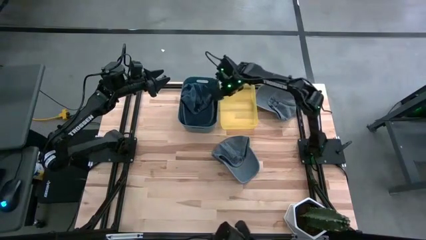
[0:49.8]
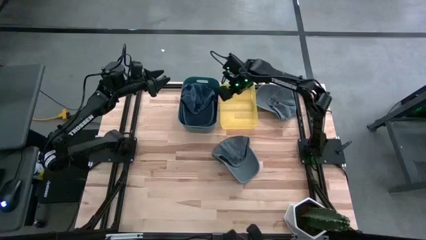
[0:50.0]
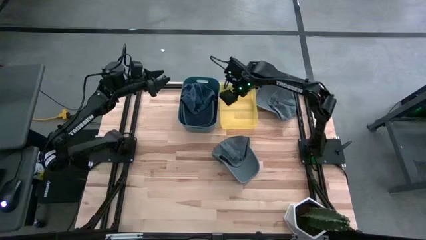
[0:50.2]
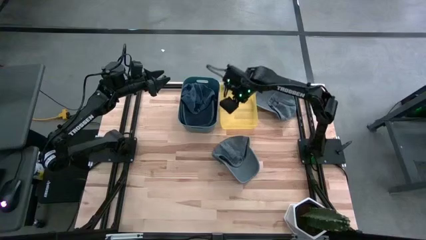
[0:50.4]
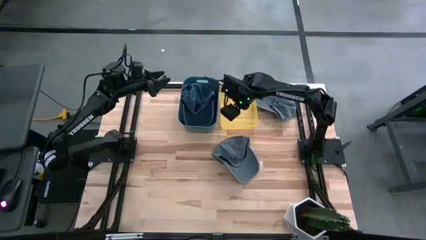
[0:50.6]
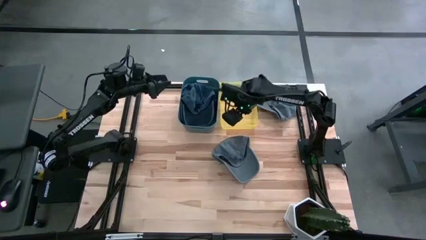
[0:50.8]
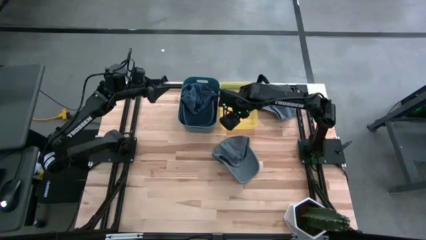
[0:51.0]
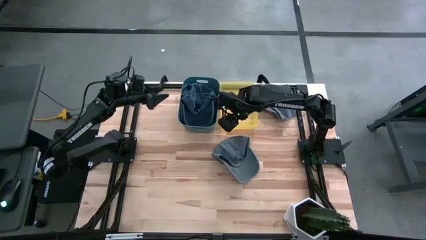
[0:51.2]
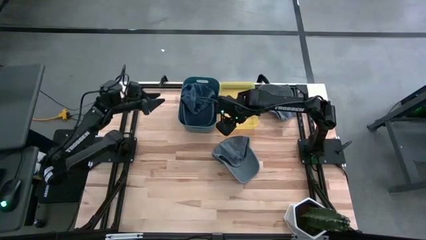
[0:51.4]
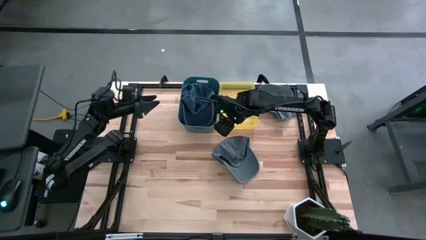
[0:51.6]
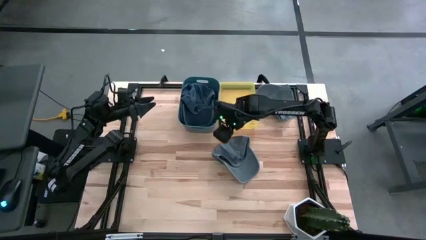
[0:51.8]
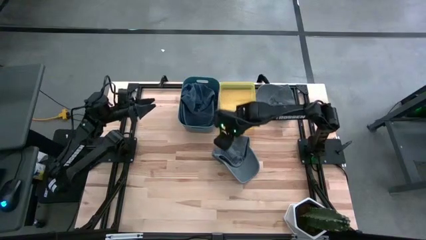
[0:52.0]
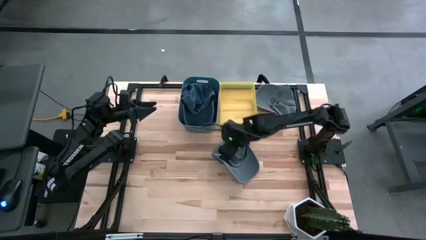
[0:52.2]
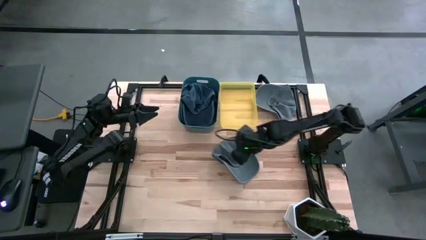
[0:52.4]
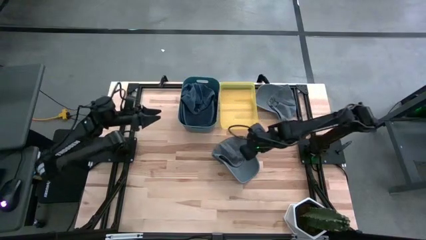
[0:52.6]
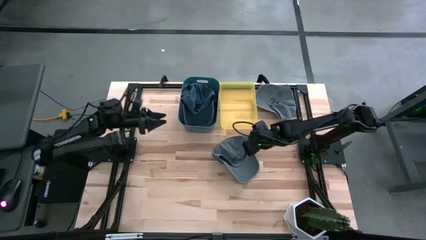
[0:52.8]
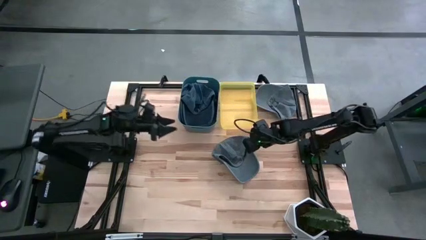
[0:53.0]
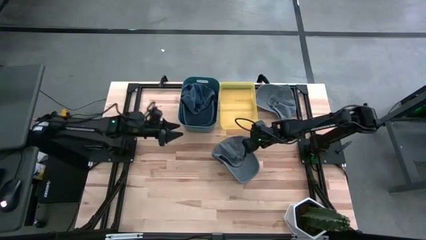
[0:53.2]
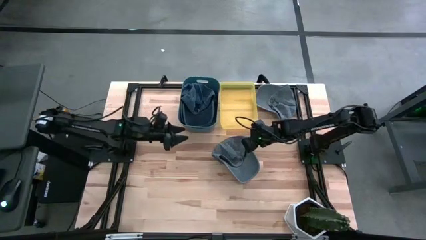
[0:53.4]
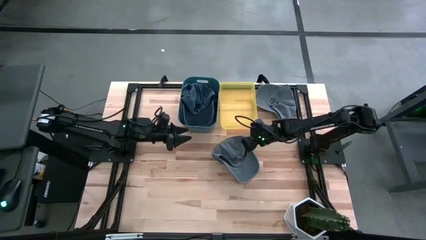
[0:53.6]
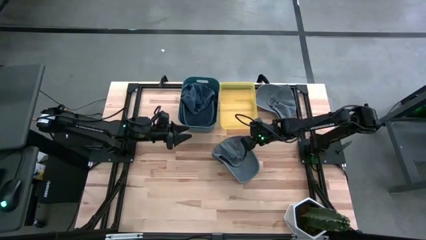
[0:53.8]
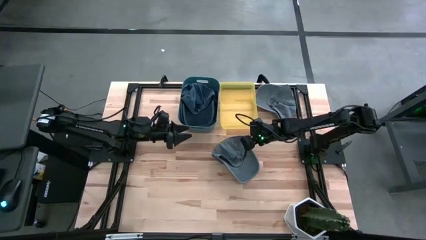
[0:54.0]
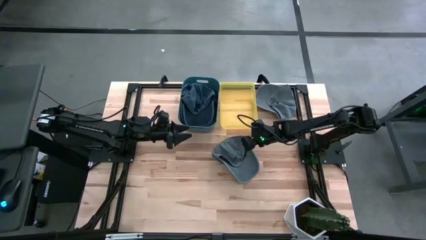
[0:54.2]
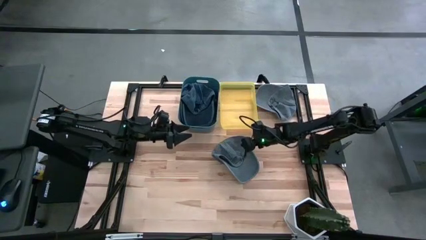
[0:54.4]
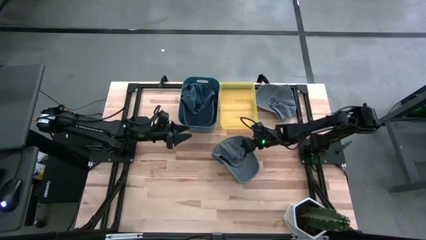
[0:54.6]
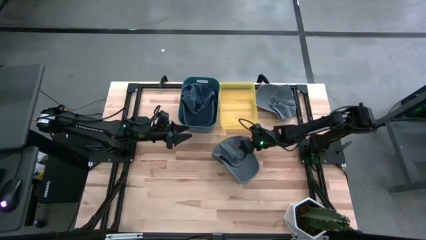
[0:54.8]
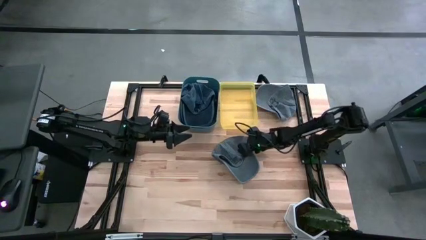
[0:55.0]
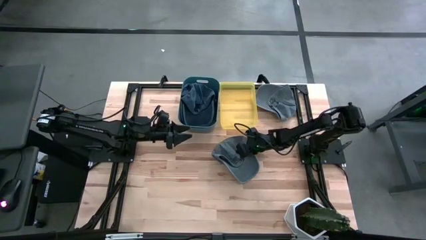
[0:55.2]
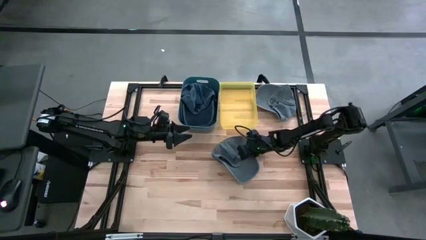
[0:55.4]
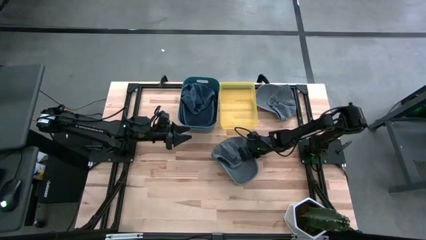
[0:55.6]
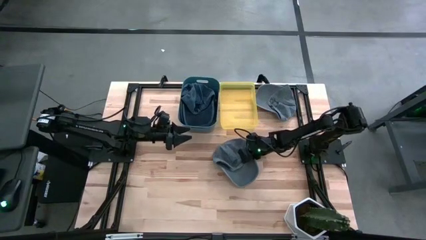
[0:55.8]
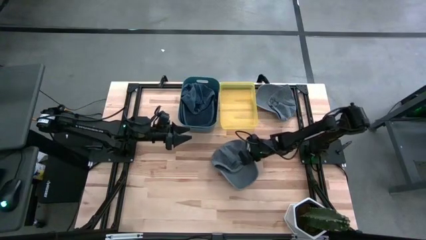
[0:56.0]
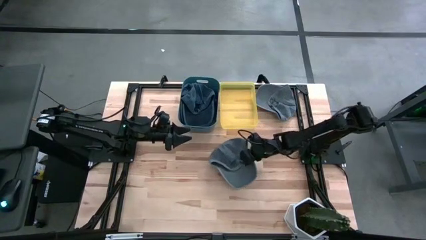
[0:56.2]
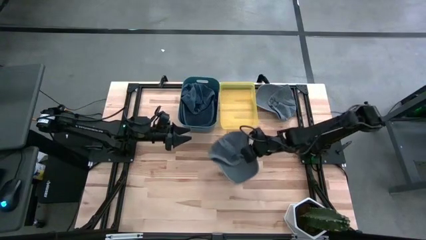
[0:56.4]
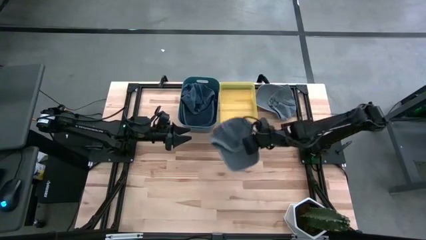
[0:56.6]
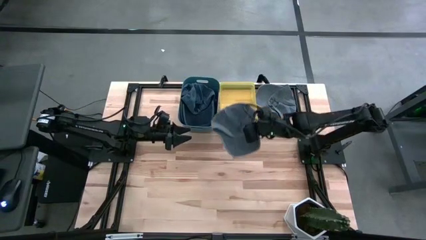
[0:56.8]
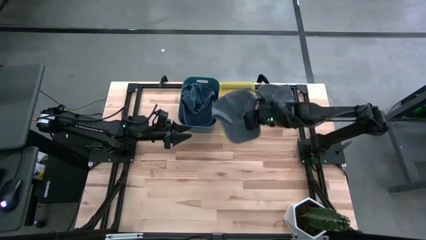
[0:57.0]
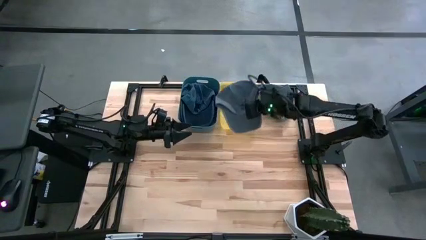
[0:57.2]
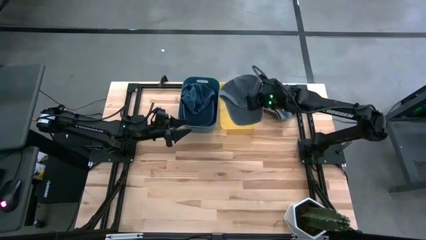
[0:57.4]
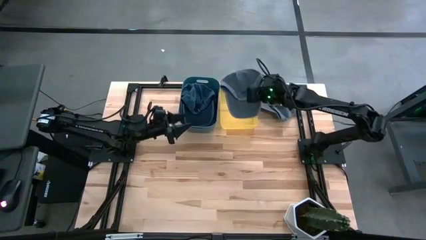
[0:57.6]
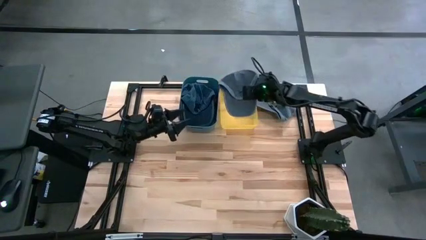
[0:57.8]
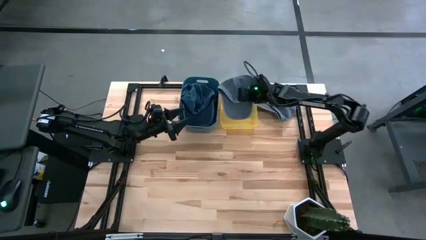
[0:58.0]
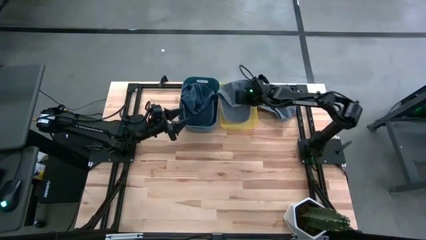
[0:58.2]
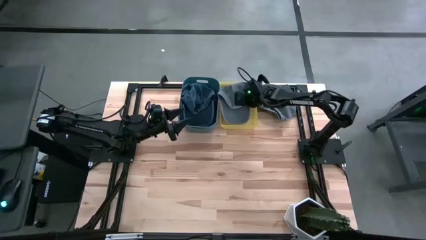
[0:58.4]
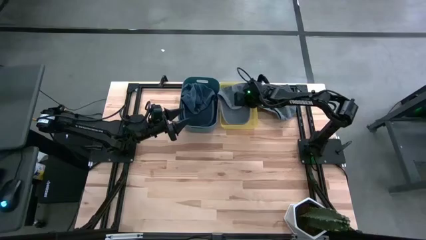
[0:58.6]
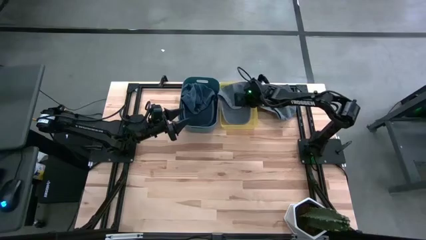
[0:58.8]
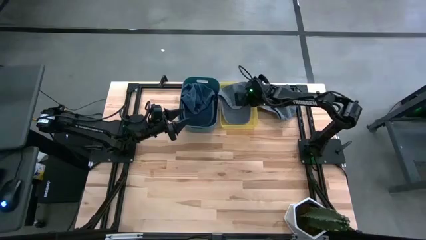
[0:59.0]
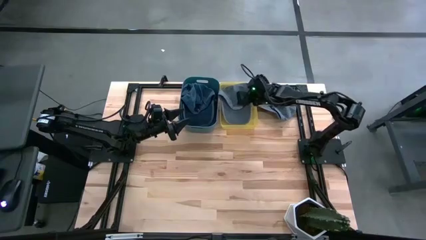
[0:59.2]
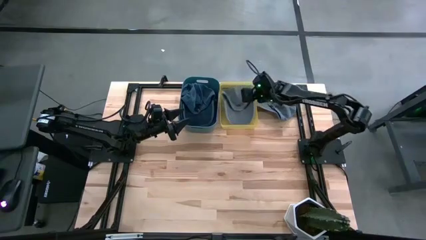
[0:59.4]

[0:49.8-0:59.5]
Task: Pick & Place hat
Put the bottom gray cap into the yellow bin
